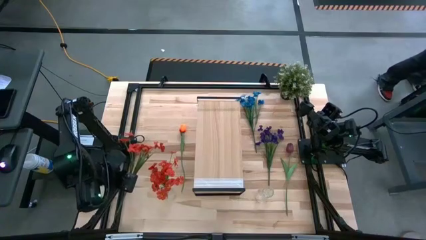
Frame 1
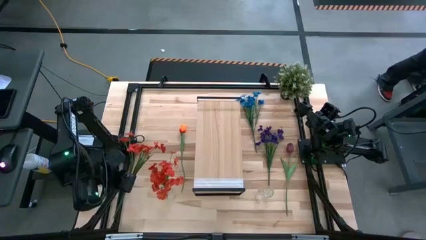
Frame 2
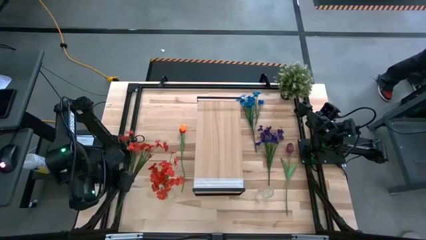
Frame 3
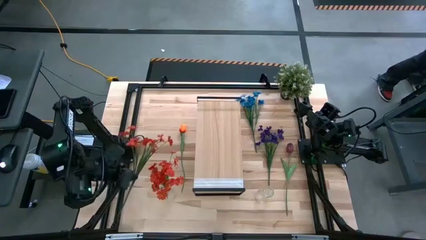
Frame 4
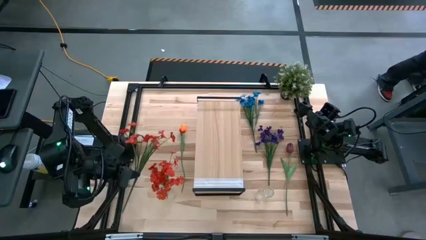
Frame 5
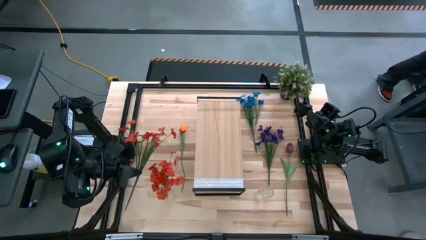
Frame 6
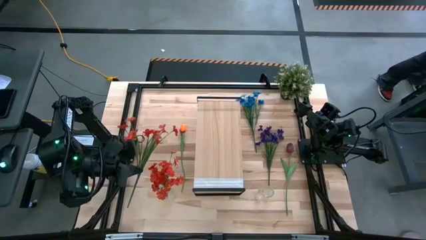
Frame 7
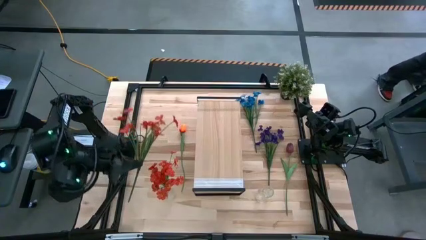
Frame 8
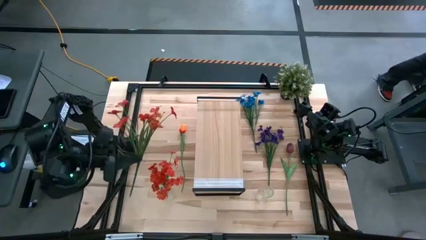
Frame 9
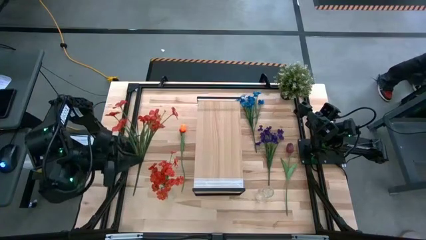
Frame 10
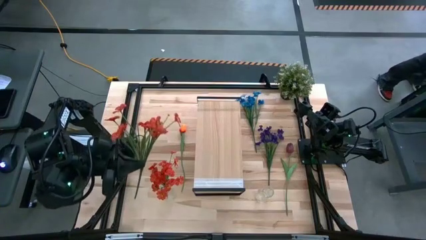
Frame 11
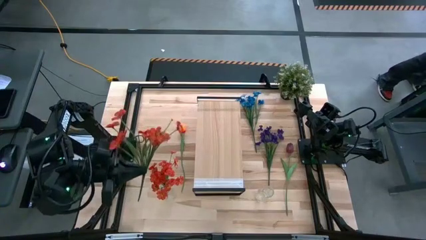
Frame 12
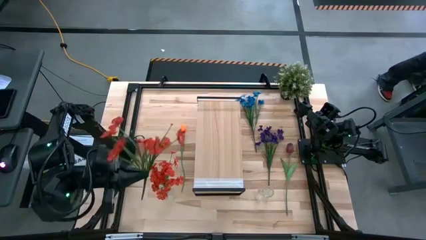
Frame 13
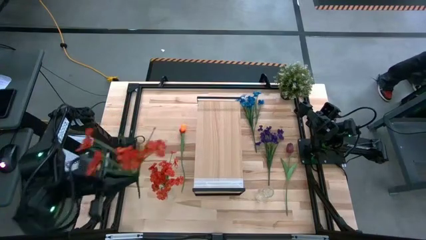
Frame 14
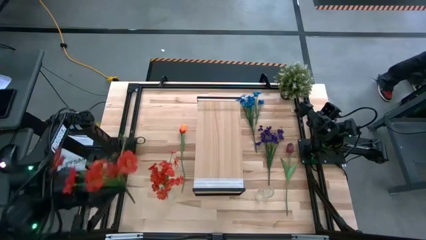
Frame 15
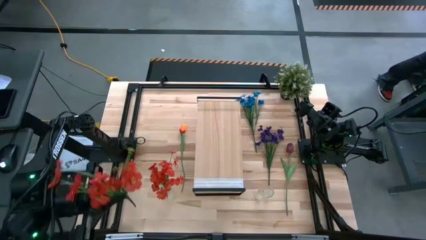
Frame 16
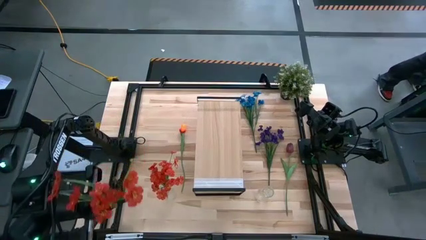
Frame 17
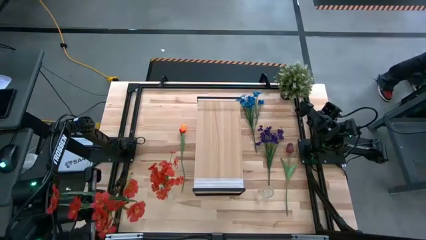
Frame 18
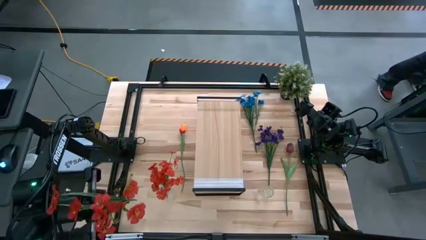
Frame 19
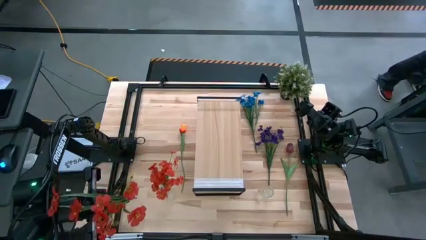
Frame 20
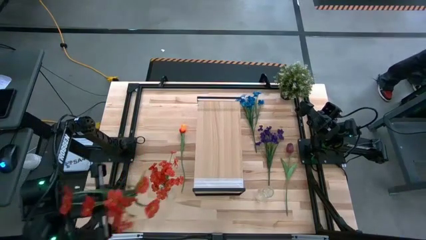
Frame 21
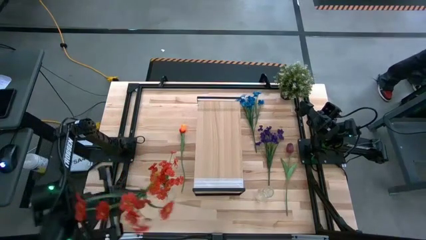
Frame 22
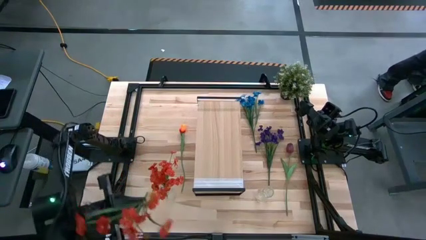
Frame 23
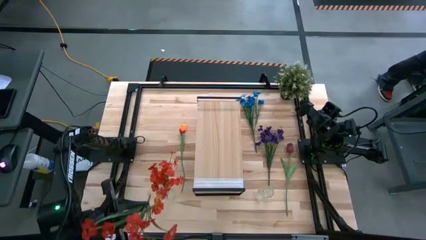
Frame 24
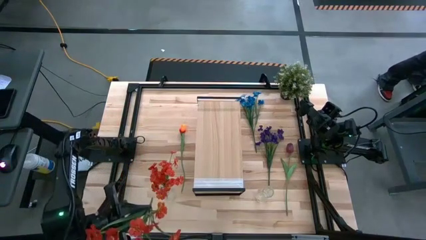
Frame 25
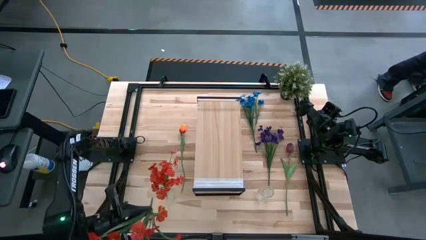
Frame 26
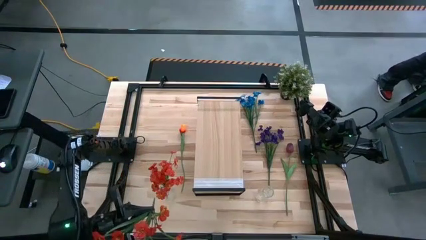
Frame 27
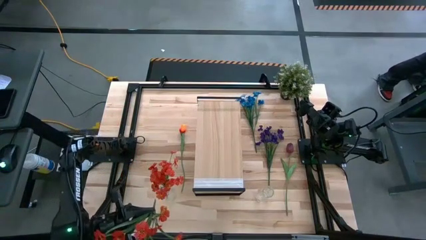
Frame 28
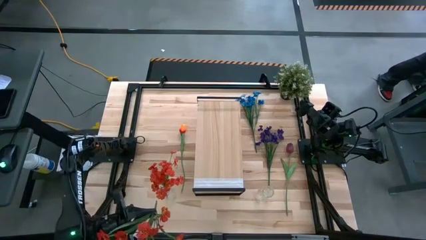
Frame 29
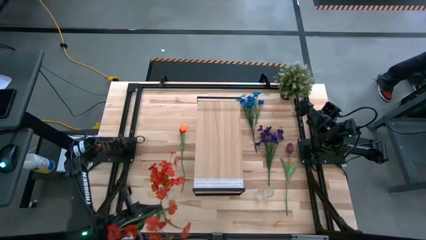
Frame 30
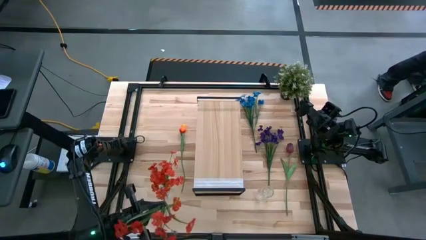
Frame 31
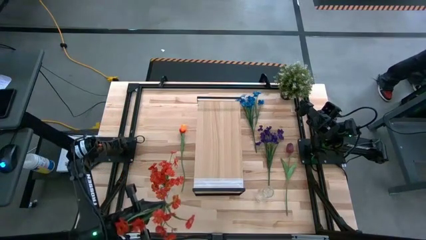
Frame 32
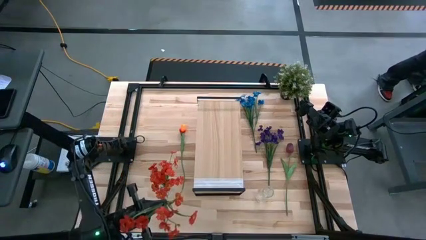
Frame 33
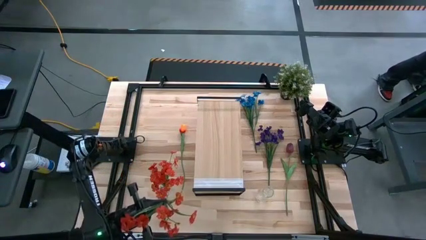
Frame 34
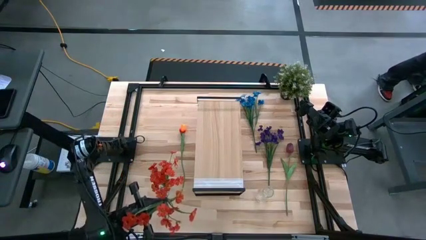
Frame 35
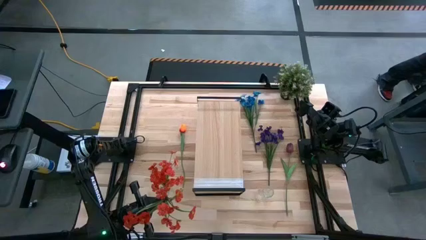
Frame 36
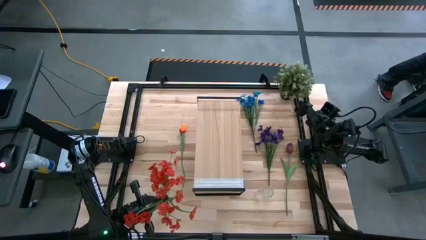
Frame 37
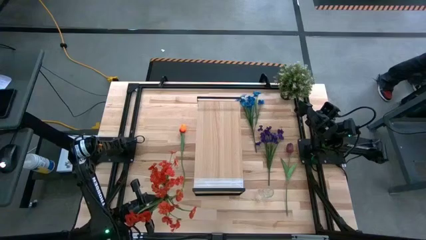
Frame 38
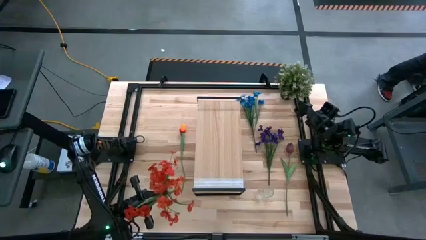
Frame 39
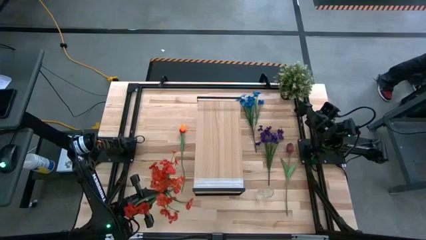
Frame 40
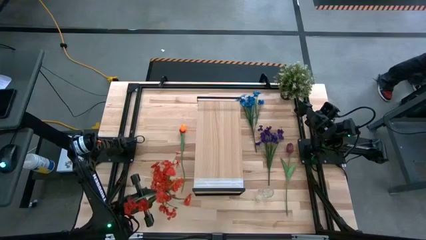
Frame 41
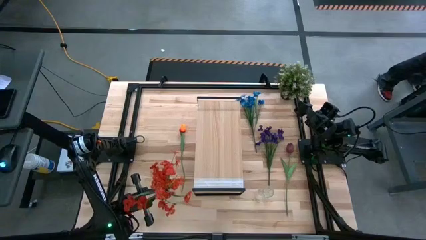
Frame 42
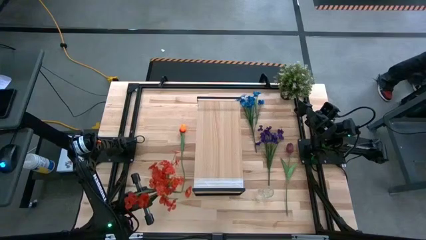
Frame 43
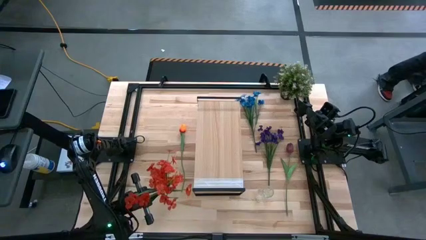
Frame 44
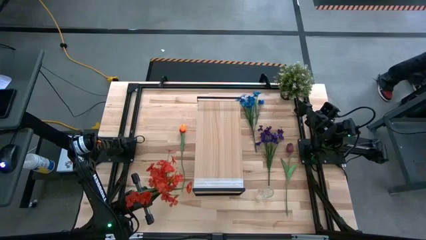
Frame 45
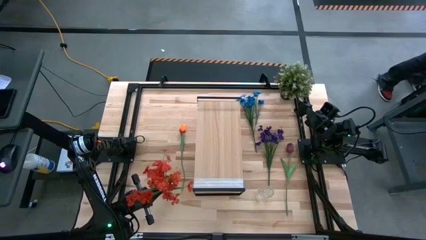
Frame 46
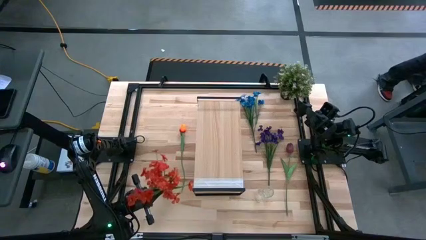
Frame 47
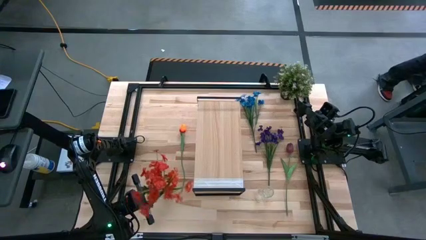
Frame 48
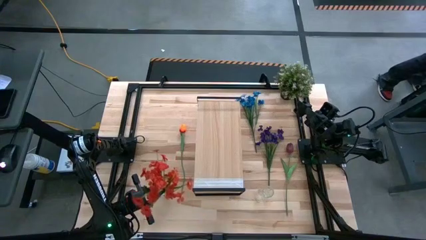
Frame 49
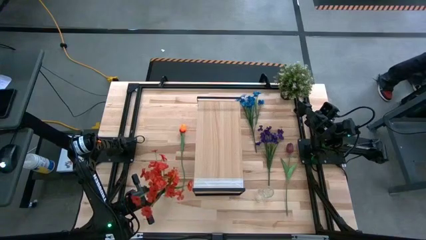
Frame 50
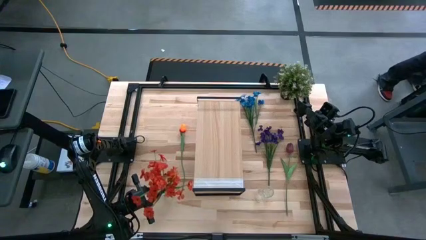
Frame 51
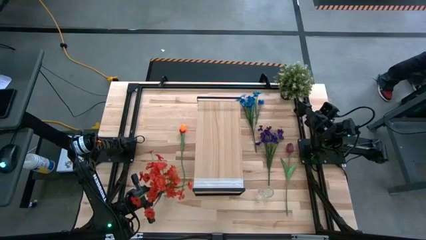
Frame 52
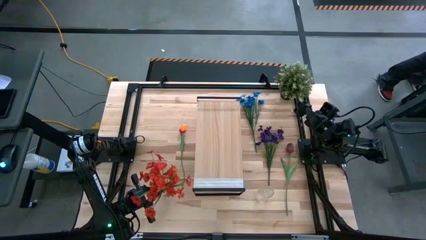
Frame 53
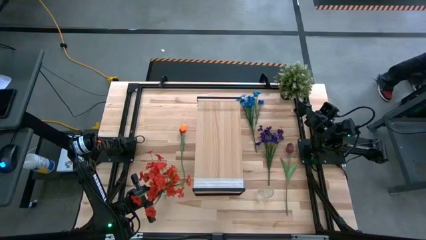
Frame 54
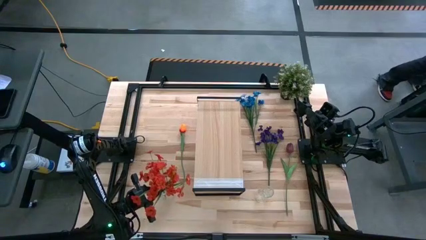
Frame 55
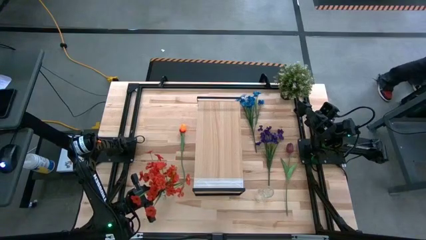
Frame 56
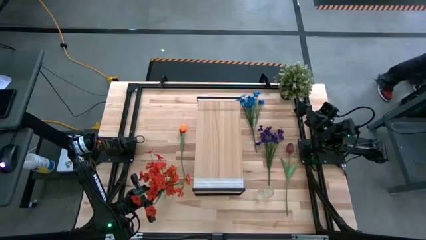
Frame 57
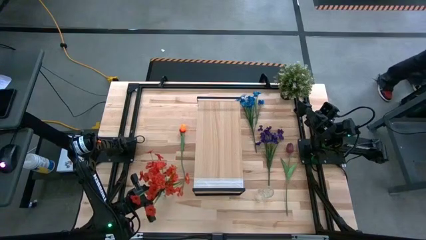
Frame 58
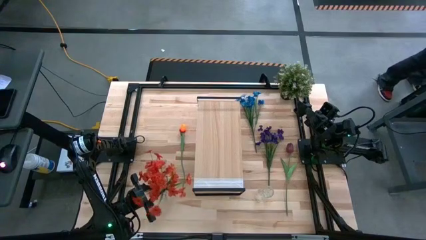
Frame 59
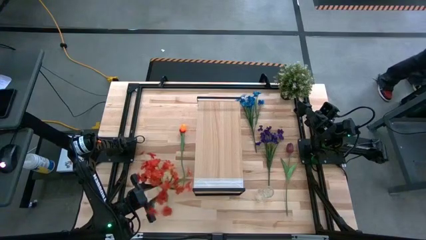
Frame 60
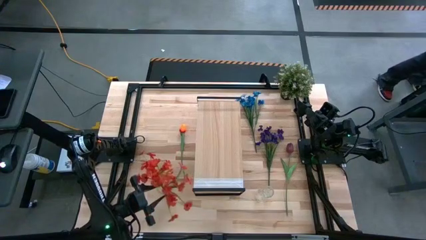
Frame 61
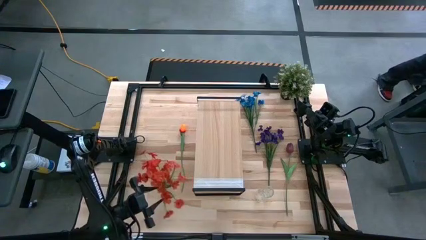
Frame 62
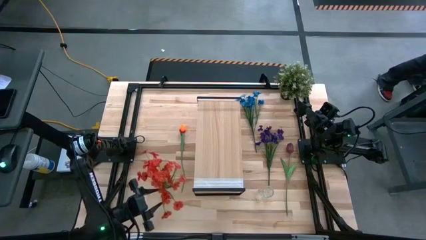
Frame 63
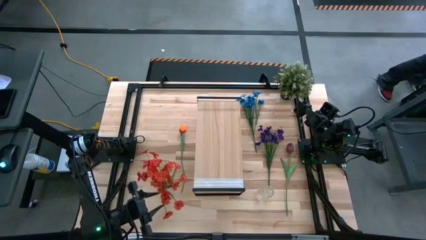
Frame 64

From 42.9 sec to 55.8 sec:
Task: Pick and place flowers into a vace then onto a shelf
Put the orange flowers into the left transparent vase

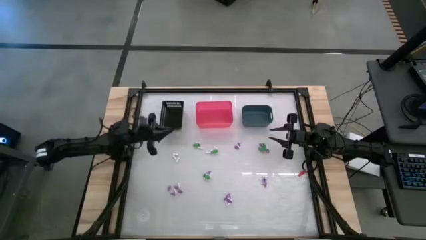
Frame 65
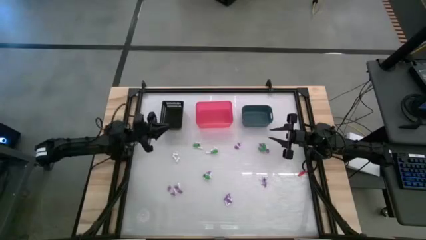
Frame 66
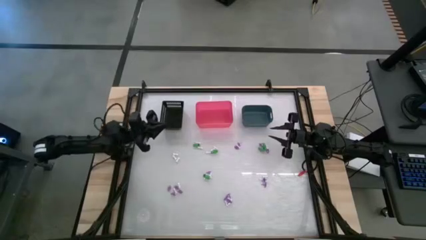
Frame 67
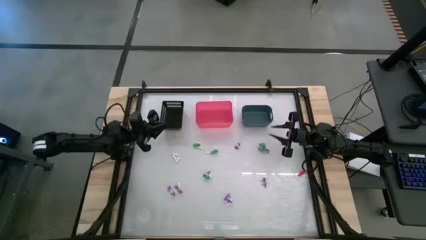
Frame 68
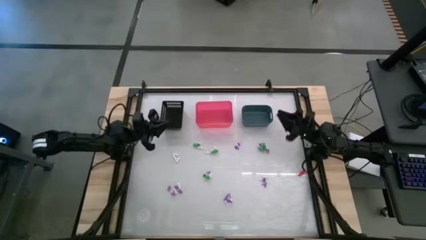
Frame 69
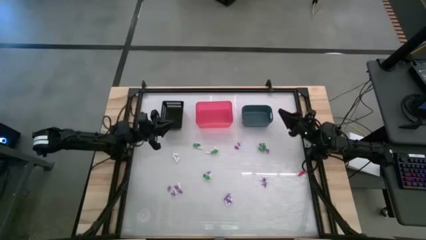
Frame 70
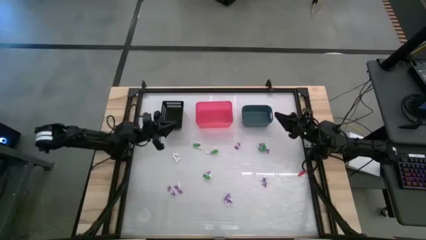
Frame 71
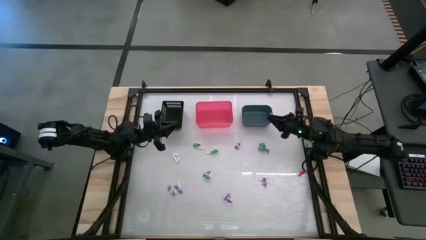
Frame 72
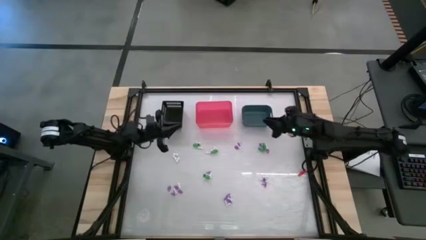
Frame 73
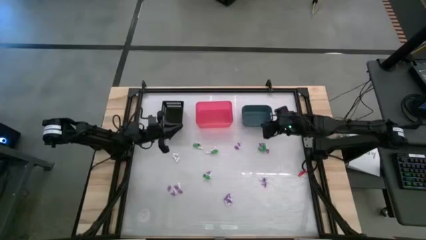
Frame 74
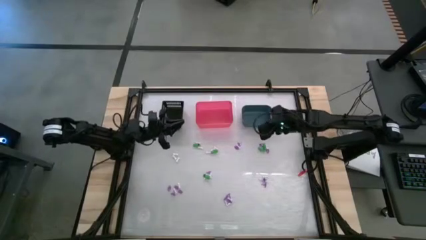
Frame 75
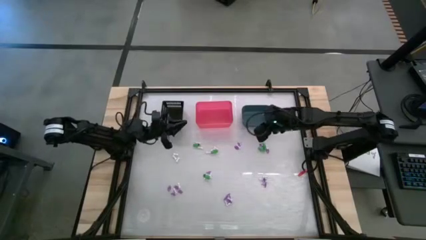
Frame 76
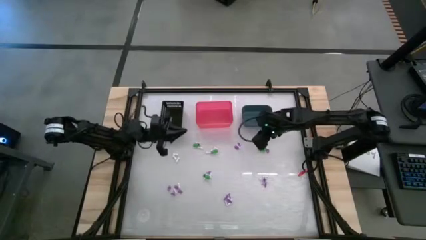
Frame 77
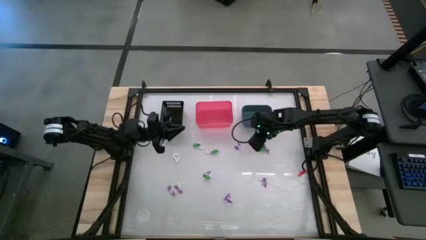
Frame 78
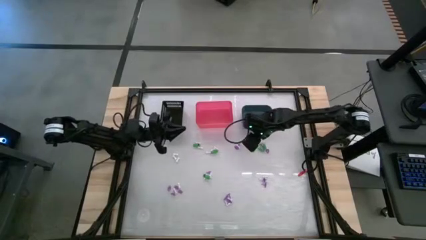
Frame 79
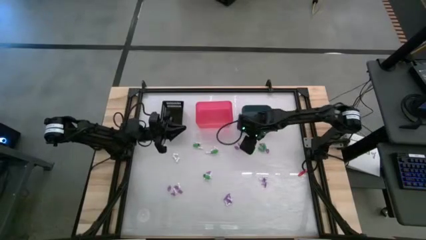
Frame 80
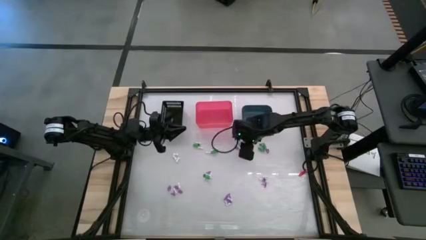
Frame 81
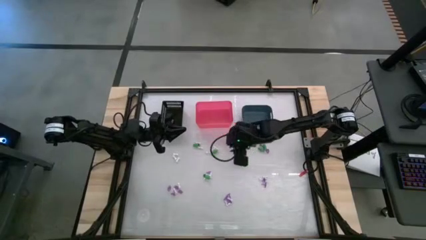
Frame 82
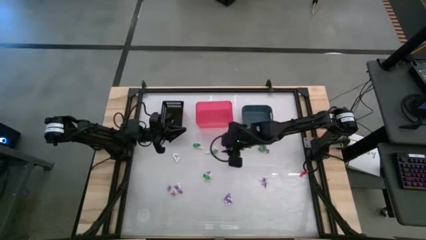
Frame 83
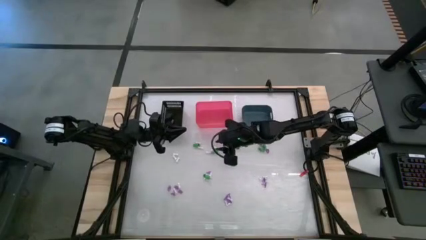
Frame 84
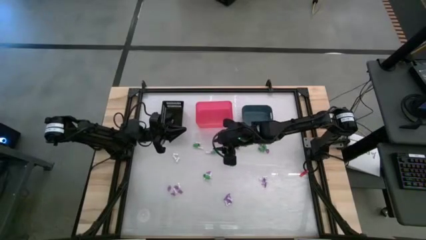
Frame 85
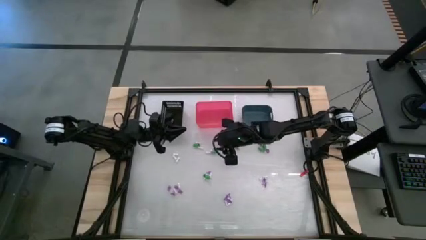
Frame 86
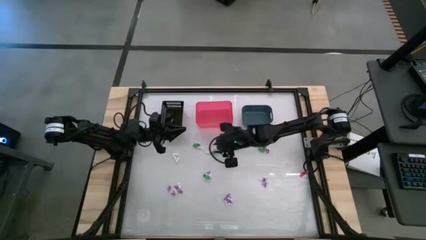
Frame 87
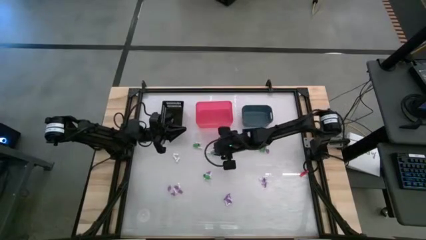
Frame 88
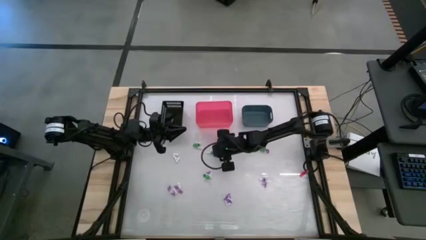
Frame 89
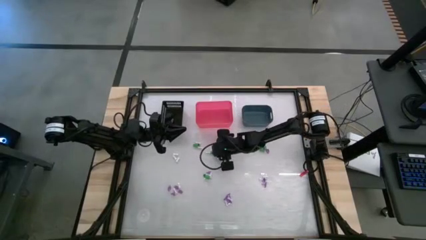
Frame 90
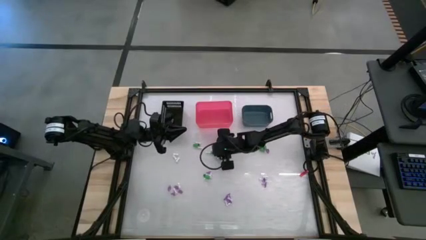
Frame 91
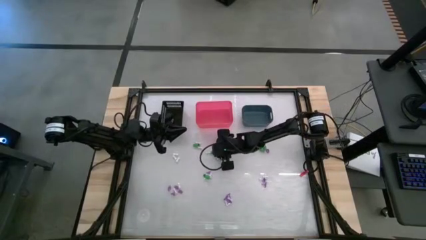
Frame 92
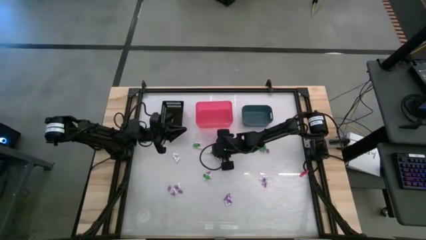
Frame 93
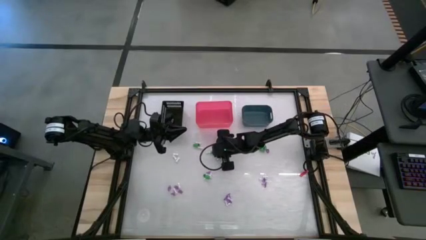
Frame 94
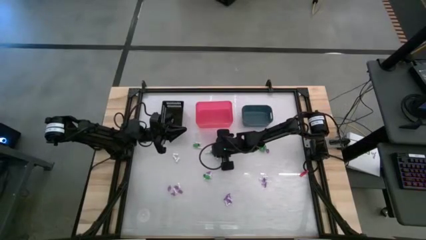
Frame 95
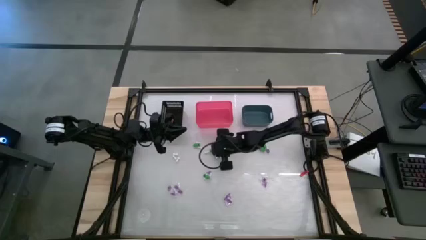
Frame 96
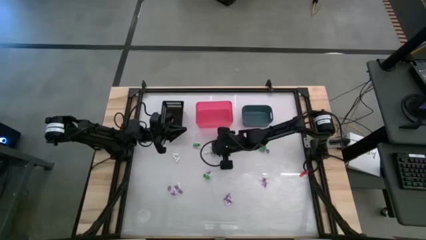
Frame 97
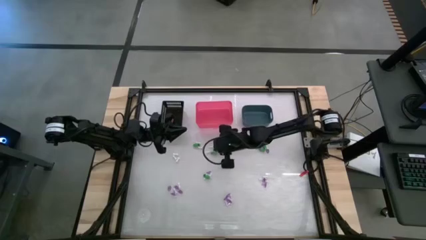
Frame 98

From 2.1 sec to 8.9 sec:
Task: Sort Halloween decoration
Put the green skeleton toy into the blue bin
